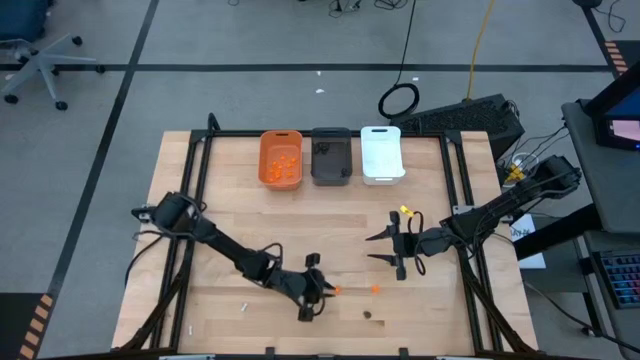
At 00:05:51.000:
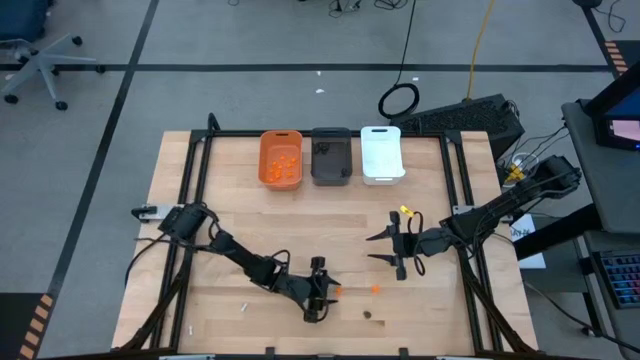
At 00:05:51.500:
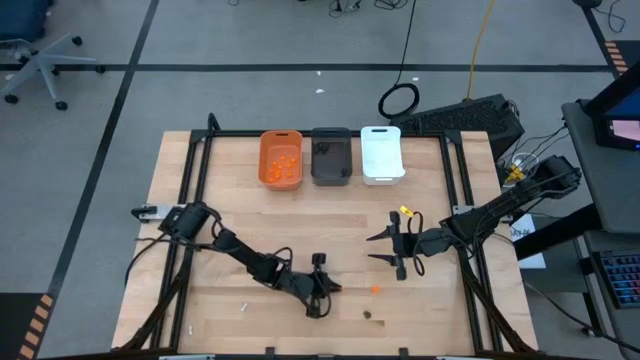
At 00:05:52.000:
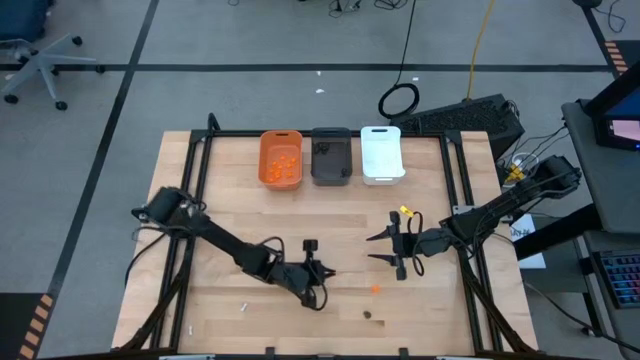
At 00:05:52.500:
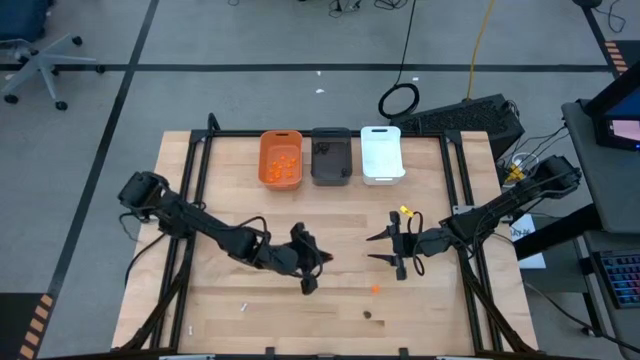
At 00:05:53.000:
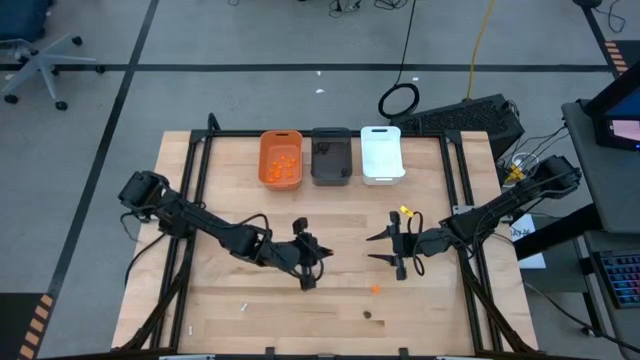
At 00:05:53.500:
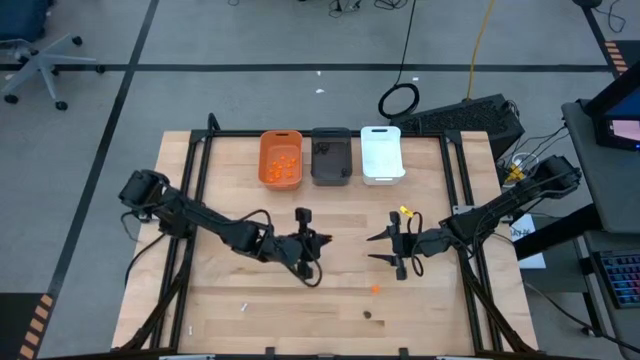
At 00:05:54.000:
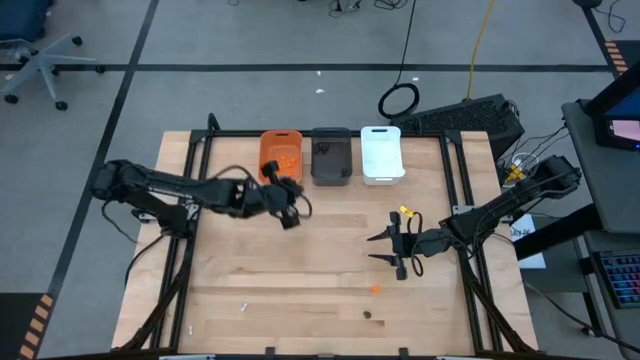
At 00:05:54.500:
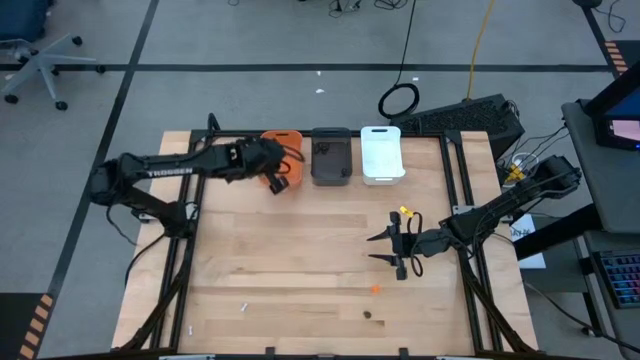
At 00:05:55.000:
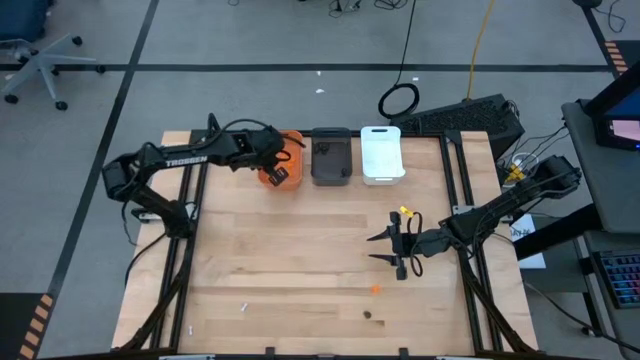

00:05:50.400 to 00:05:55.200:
Task: Sort Halloween decoration
Put the orange spider toy into the orange bin

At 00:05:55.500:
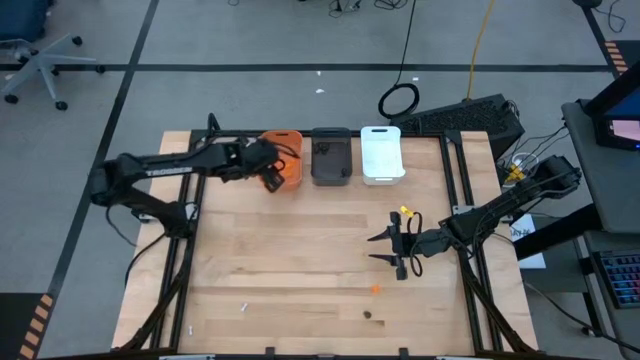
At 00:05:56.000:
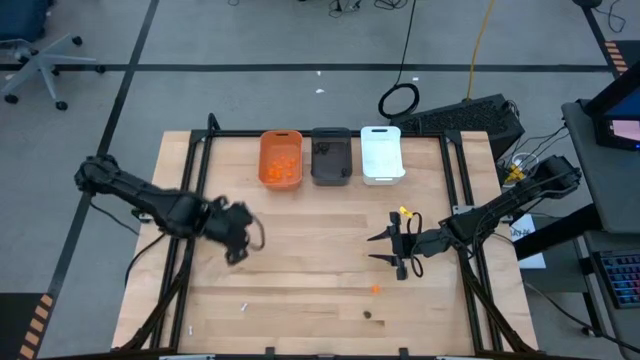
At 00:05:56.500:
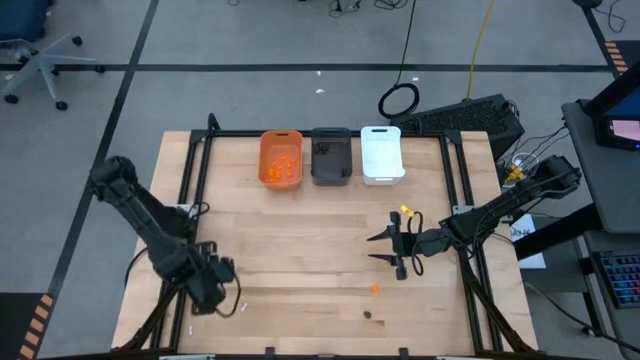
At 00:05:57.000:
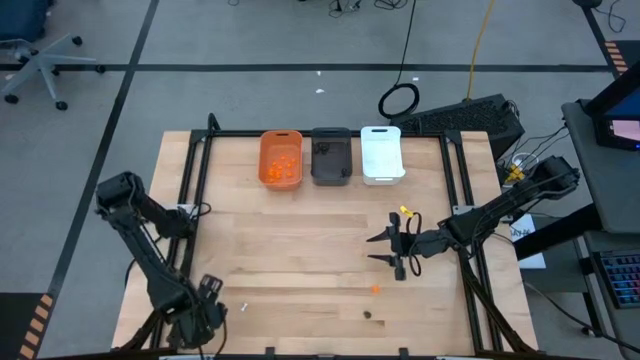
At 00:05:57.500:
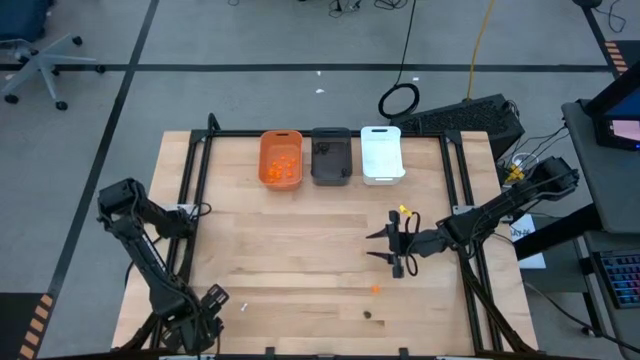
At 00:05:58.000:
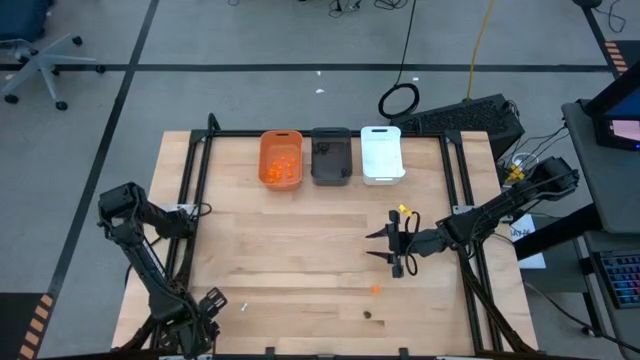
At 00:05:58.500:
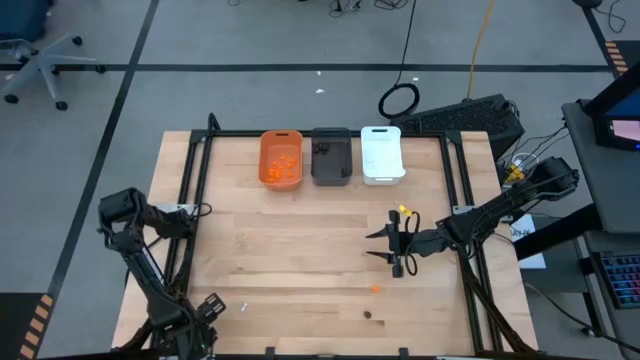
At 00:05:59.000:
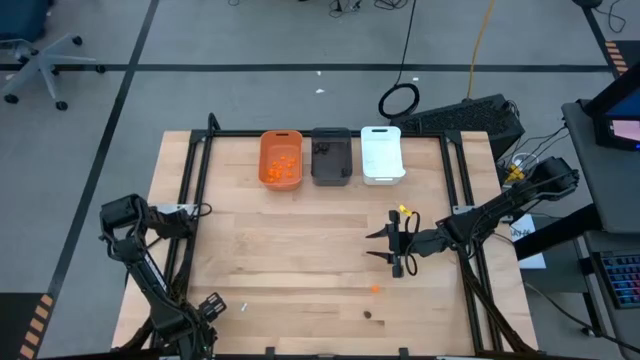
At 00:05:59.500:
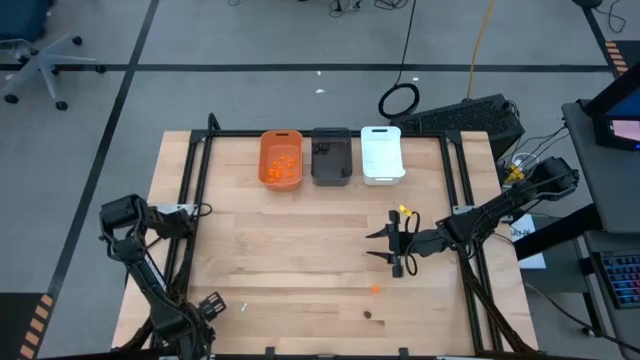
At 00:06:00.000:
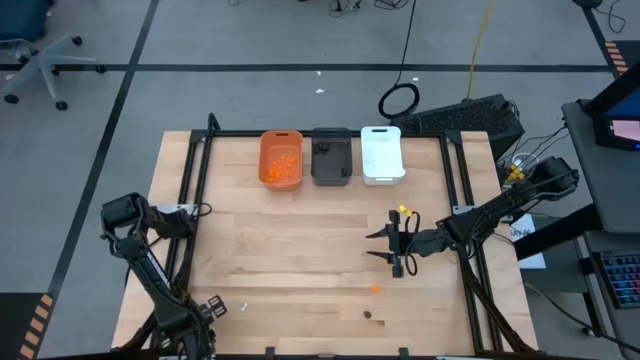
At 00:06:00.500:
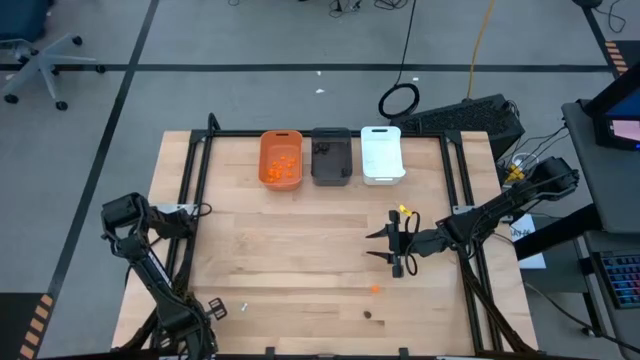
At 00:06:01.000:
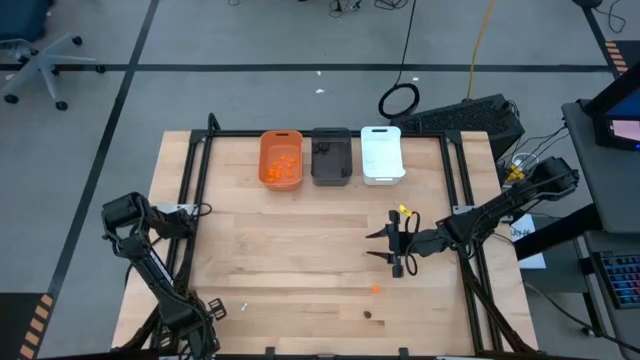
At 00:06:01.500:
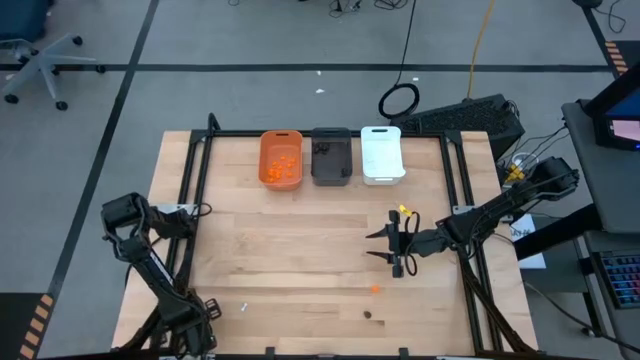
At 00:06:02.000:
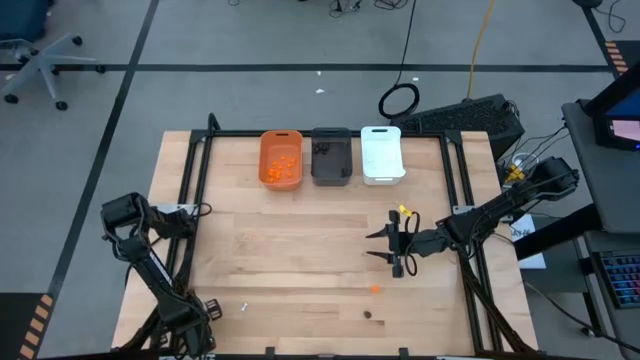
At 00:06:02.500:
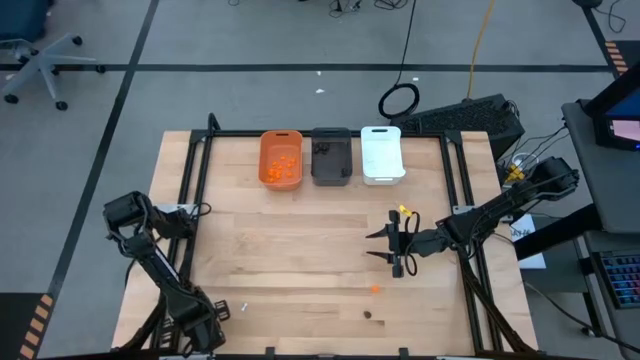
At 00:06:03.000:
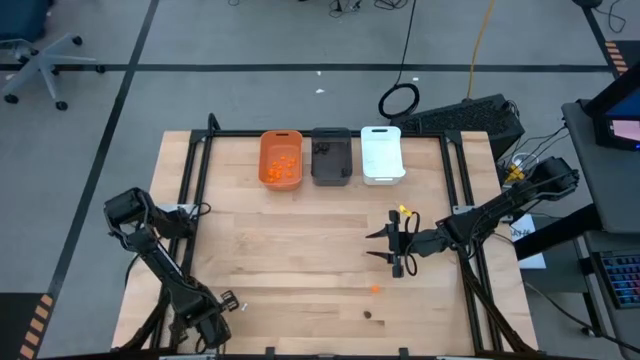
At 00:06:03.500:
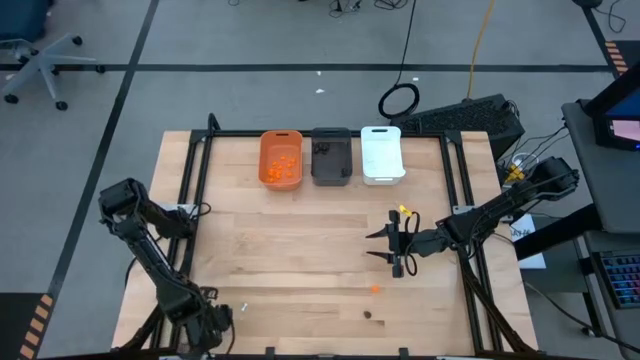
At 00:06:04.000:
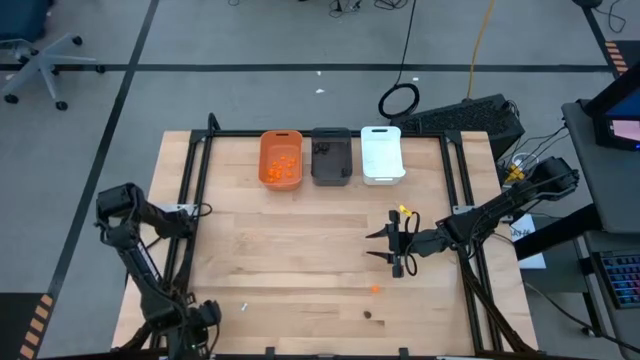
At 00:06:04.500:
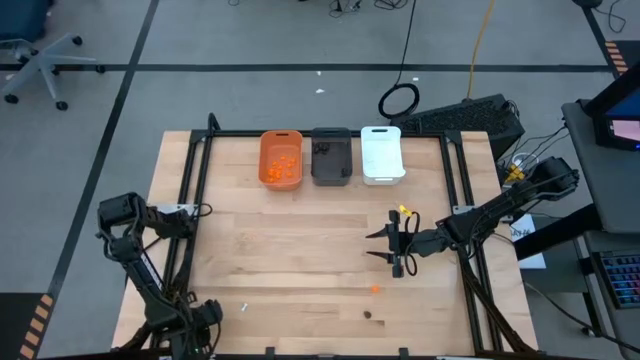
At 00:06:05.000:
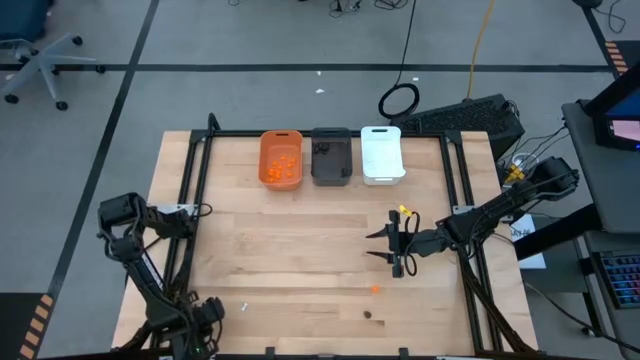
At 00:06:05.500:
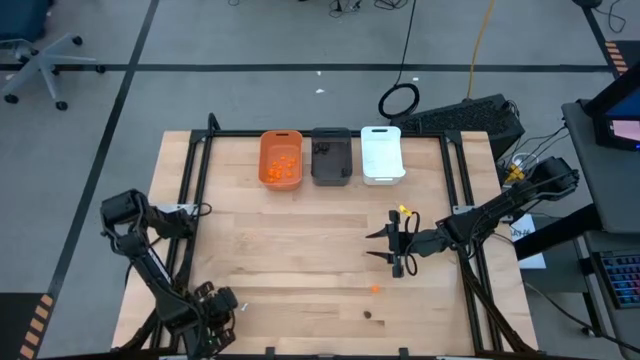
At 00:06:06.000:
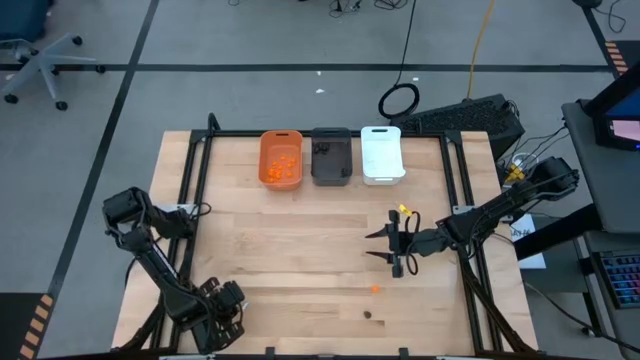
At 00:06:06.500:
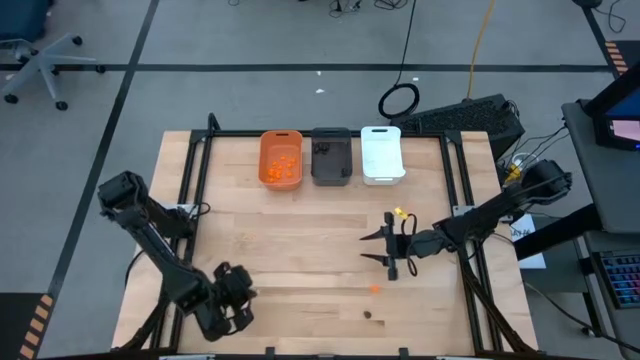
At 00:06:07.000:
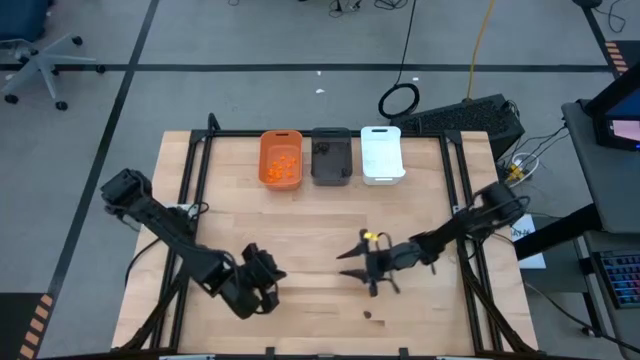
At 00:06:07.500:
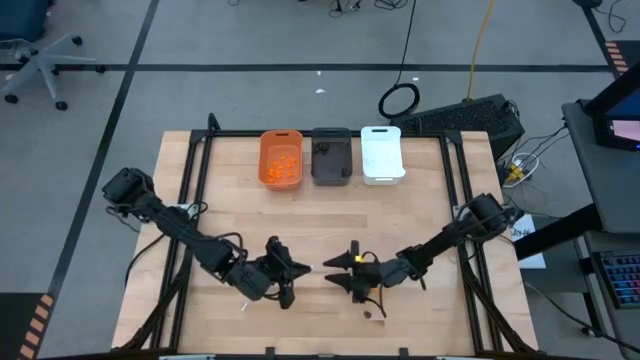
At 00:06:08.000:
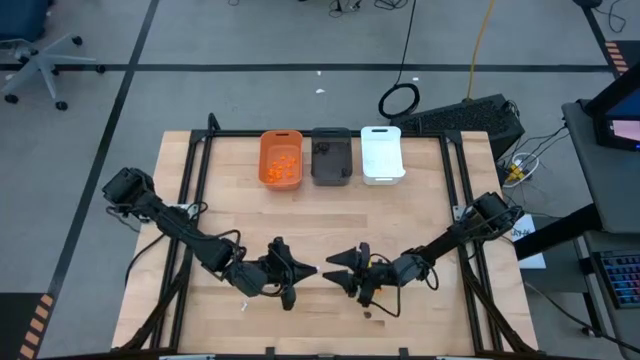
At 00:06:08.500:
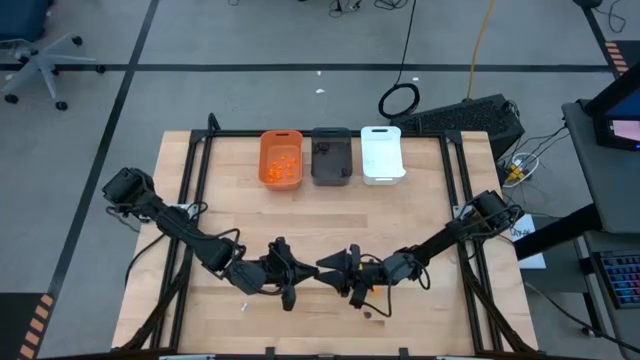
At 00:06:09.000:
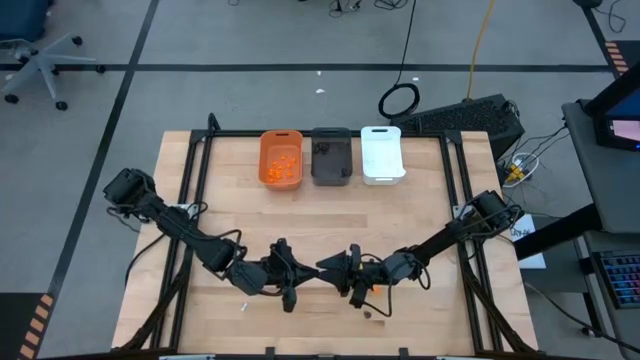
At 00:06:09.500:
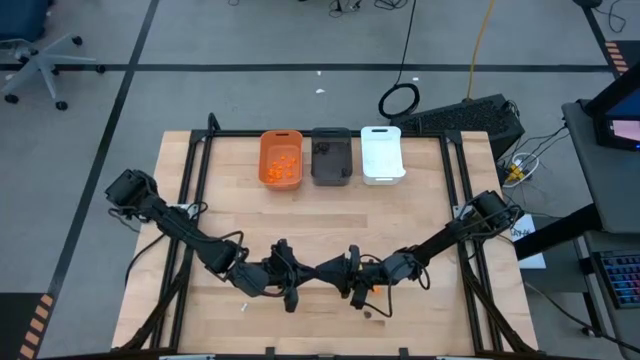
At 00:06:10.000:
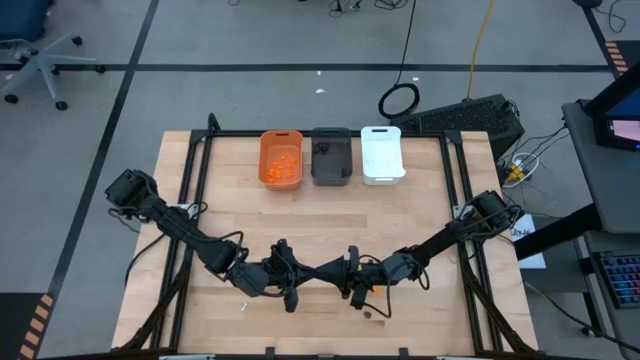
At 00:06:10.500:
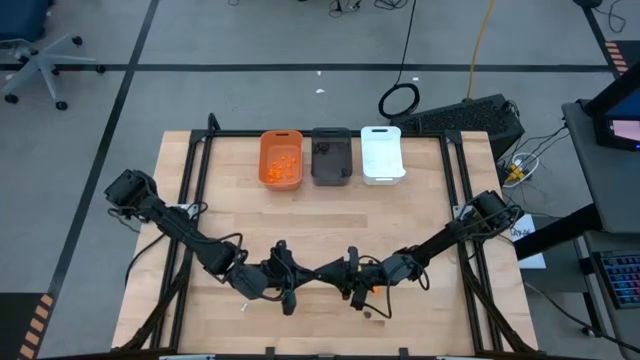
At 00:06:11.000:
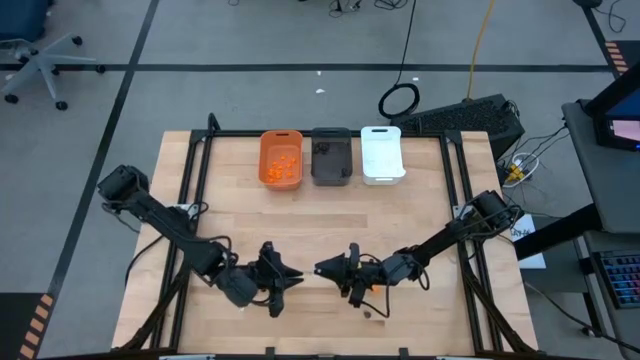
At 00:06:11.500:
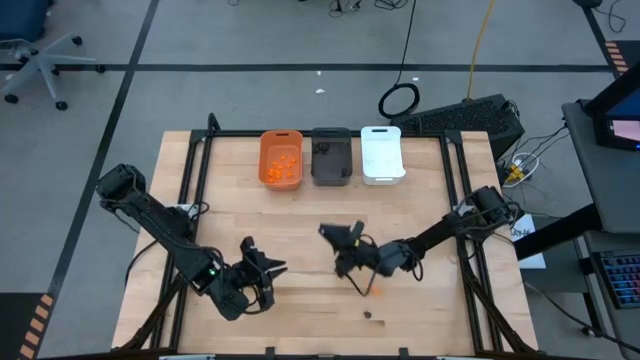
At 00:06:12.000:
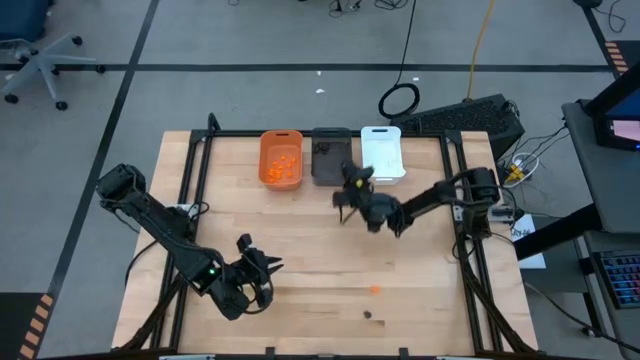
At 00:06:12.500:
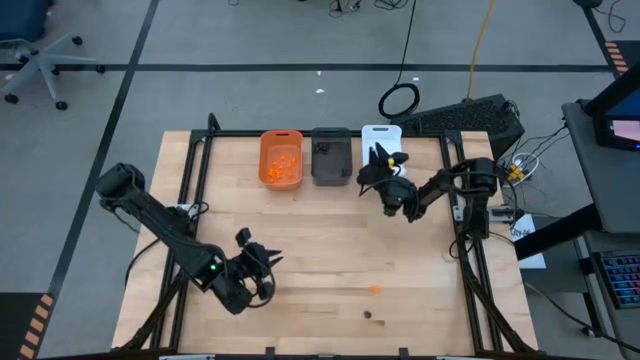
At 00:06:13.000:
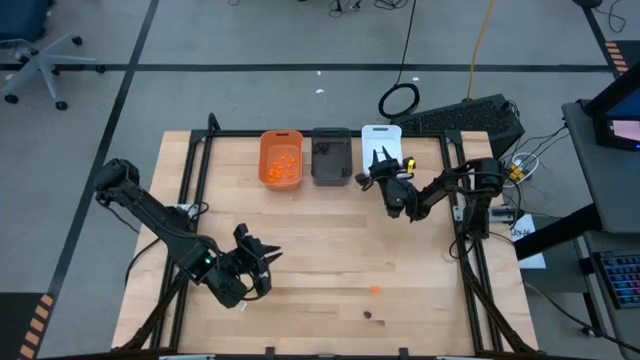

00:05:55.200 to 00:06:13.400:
Put the white bone toy into the white bin
